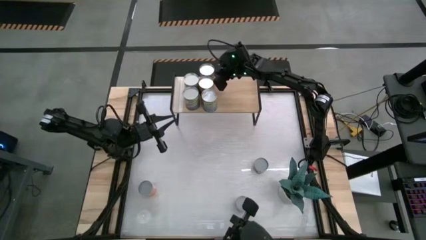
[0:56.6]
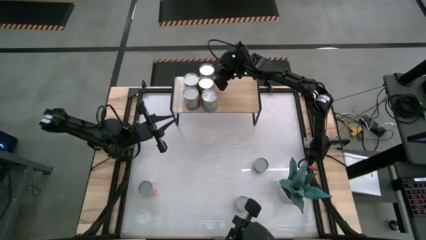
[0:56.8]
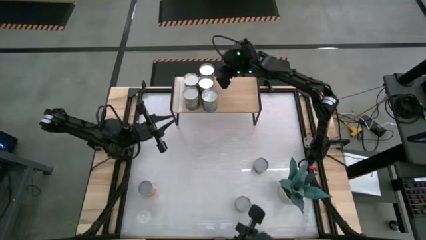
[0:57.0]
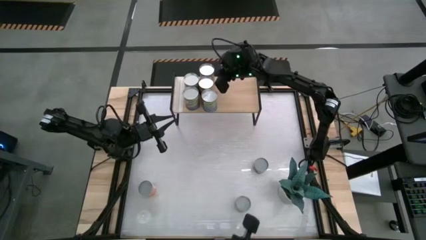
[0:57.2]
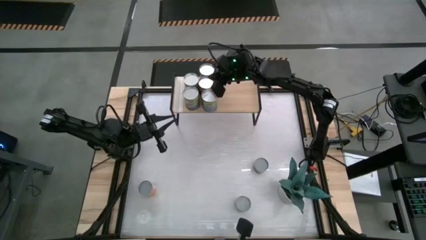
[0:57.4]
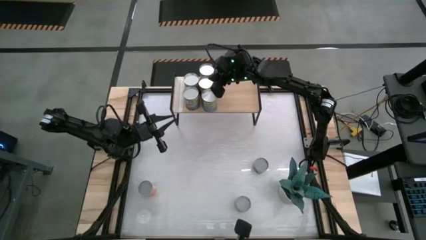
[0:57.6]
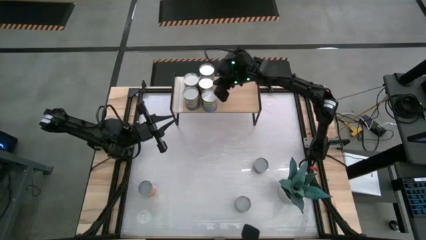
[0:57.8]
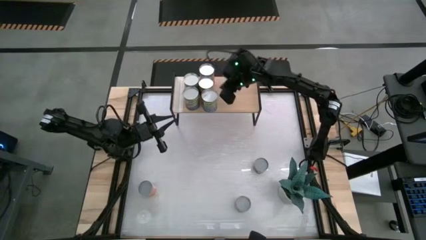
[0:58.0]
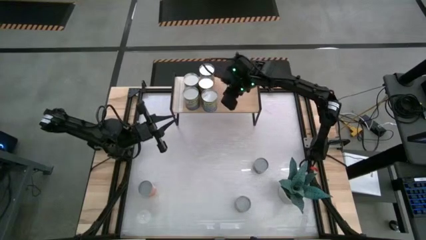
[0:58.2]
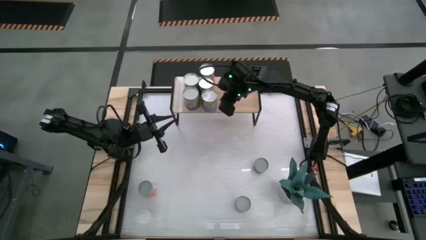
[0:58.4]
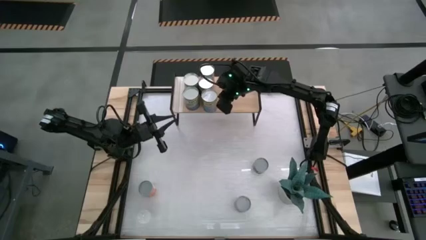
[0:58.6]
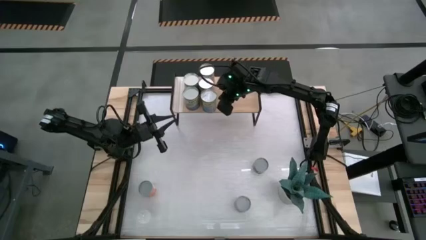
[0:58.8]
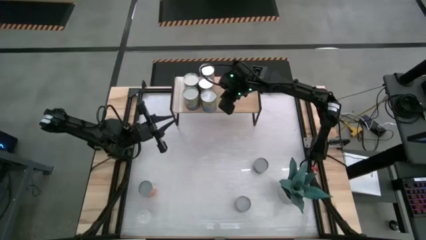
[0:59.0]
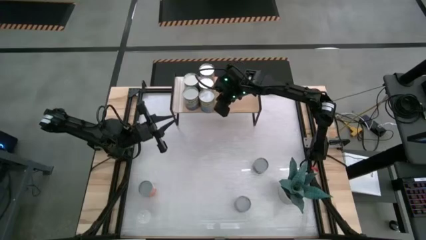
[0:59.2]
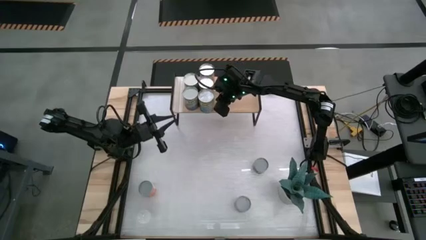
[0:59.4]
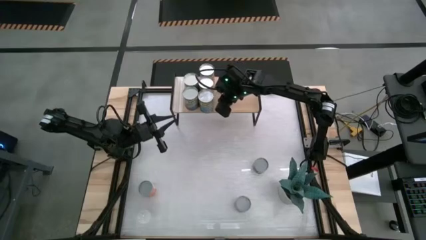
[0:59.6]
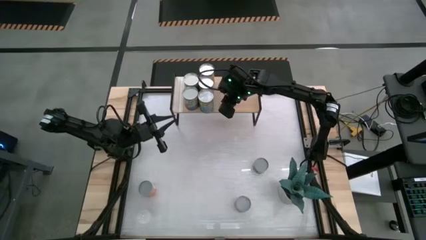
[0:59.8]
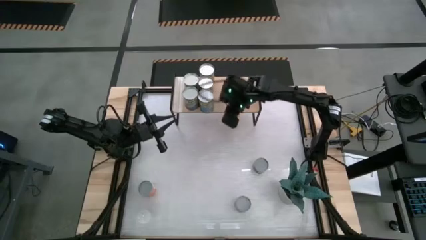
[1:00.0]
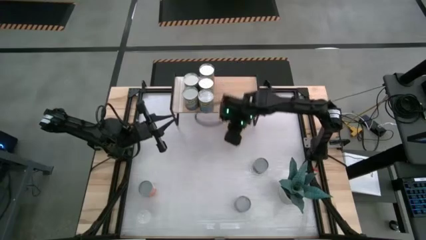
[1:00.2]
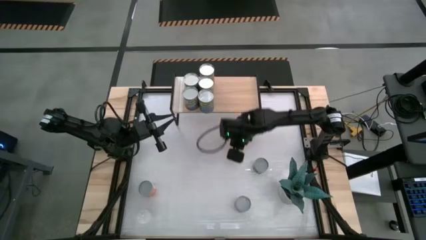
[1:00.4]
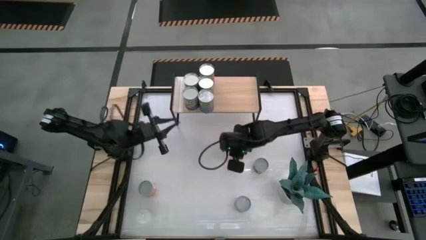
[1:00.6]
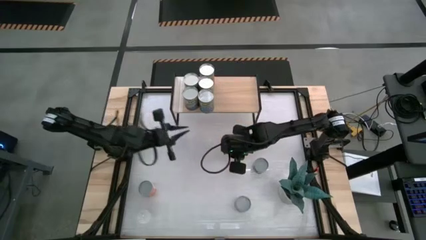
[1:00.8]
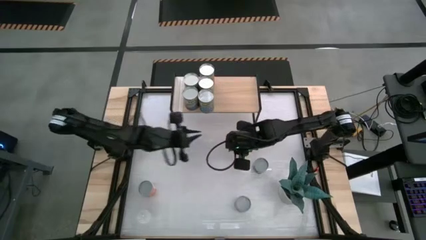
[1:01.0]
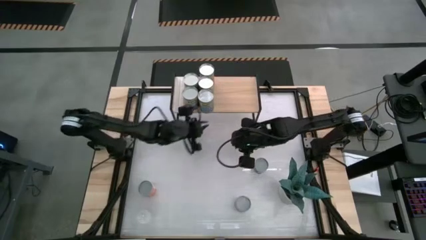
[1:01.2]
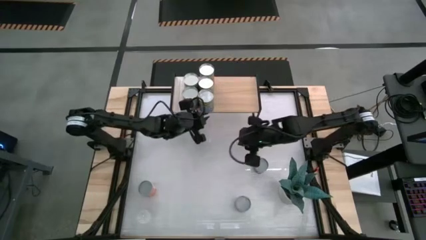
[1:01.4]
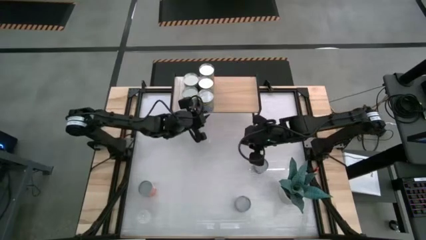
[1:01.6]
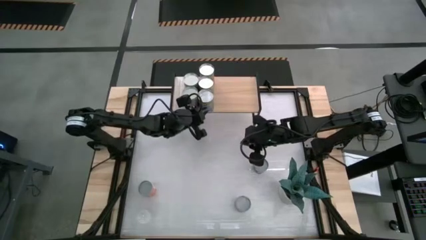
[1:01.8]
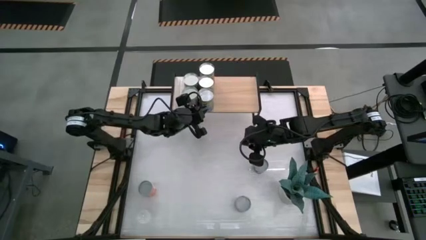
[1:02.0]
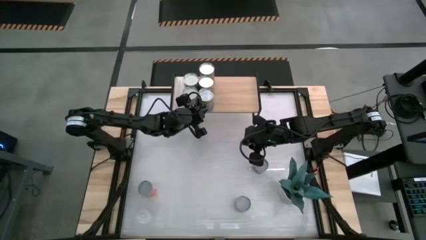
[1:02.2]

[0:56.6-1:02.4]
Task: Pick and place cans onto a shelf
Adjust the canned cherries on the shelf

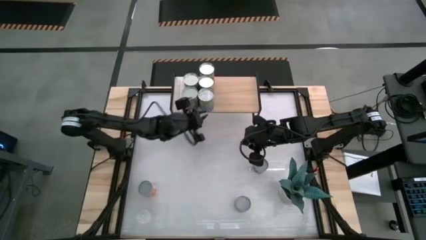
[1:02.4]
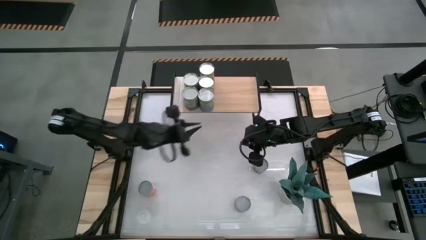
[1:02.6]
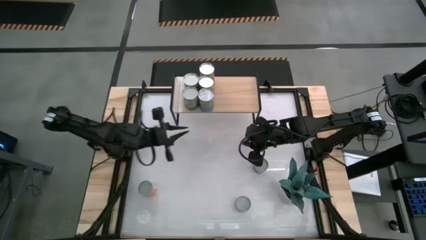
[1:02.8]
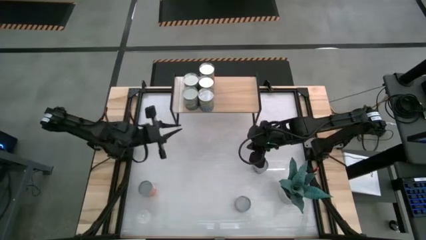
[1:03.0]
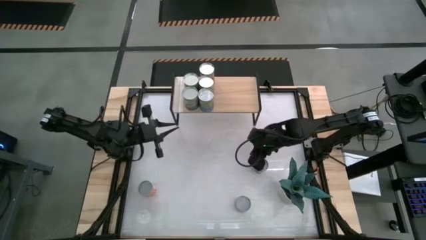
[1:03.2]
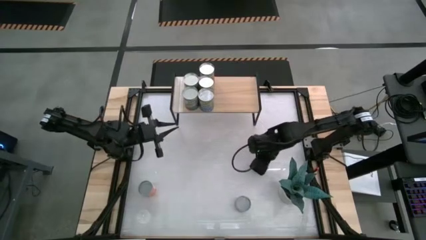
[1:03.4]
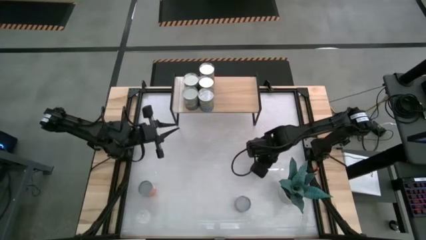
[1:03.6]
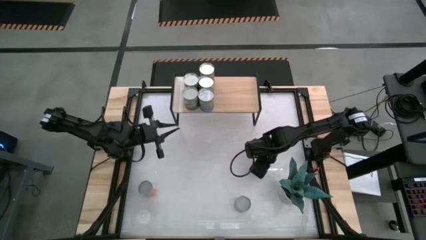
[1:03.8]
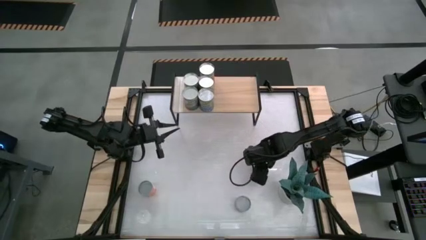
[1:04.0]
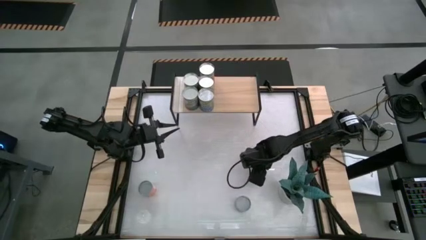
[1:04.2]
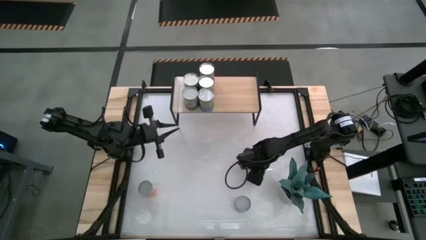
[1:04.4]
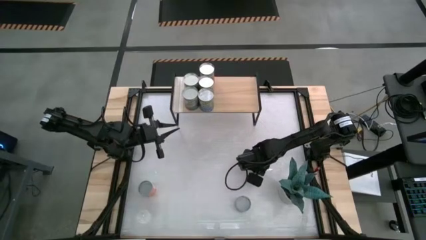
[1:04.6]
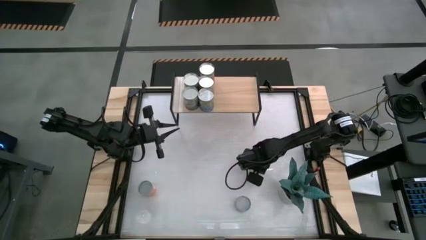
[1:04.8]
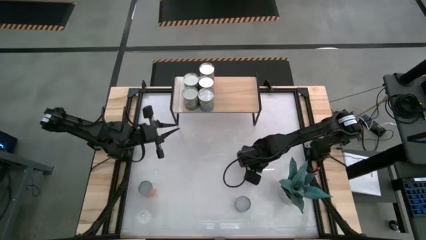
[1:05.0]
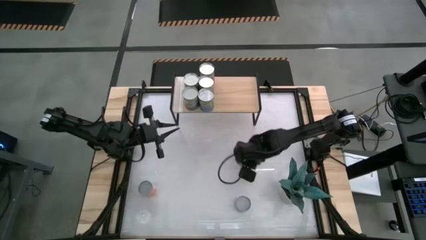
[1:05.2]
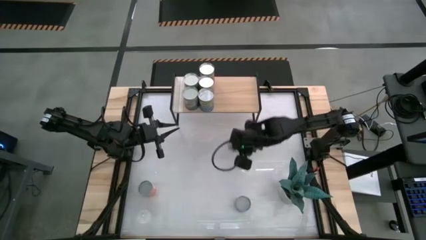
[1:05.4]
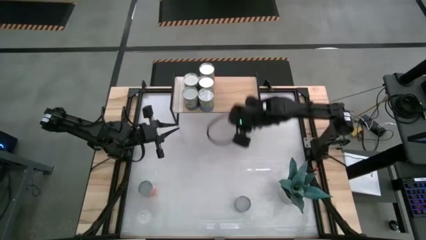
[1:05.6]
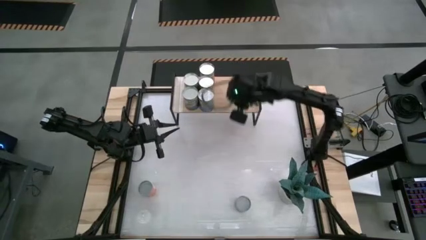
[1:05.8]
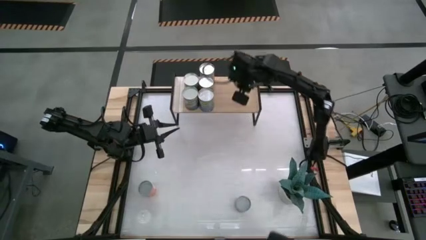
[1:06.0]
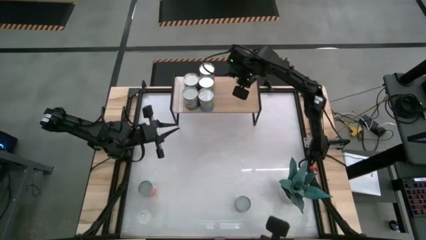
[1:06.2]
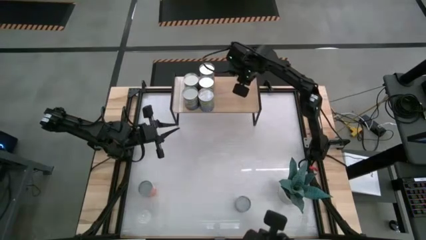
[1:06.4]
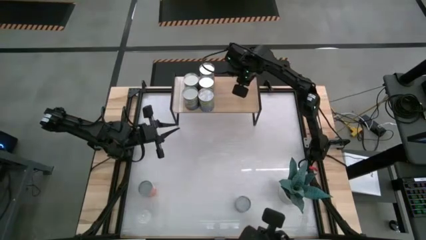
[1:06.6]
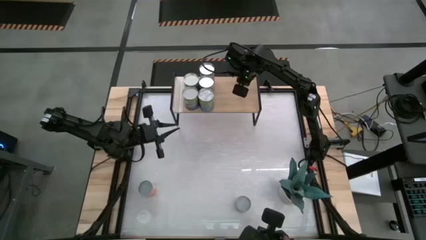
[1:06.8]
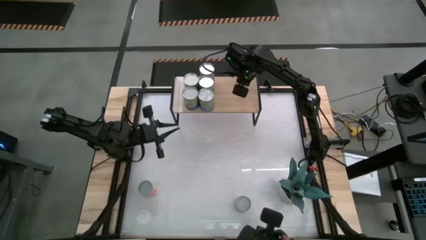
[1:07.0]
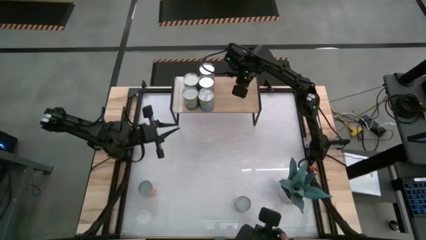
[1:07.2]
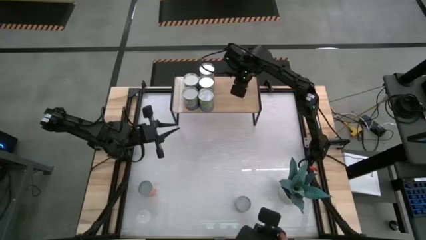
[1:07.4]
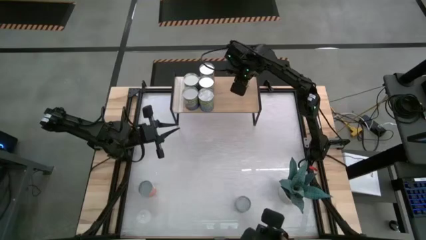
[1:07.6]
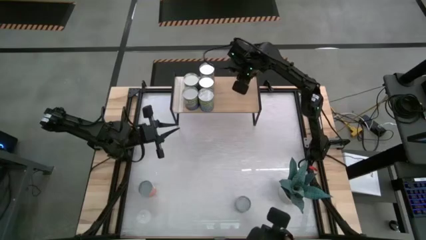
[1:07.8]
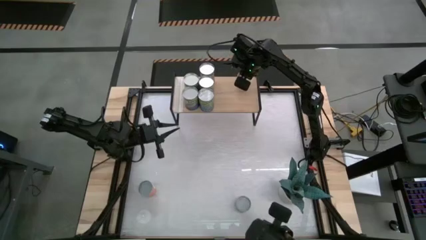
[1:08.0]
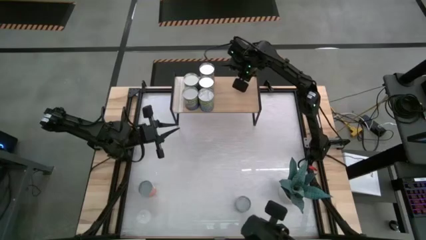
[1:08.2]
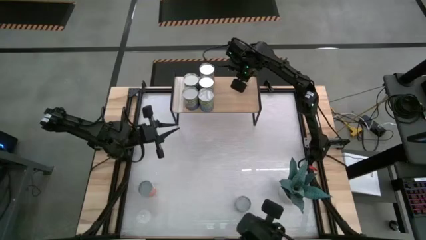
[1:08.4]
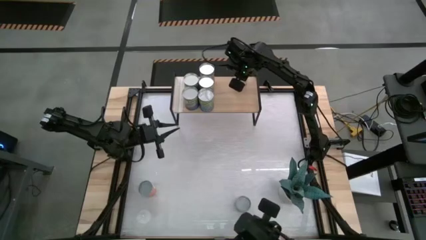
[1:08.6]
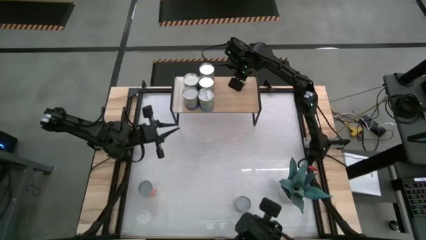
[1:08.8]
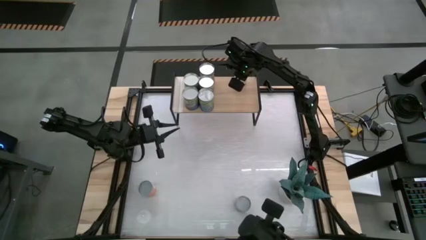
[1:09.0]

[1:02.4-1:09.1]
Put the small canned peas on the shelf

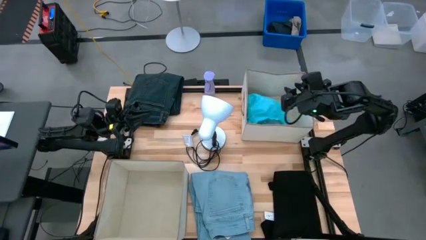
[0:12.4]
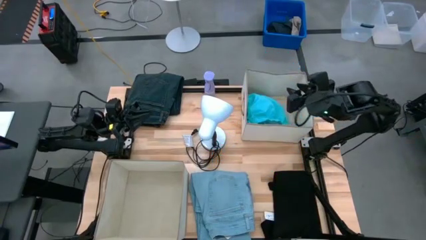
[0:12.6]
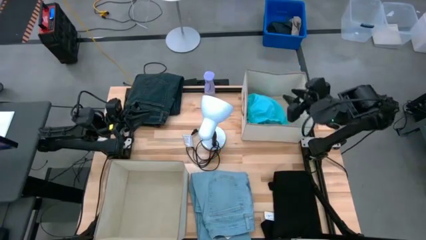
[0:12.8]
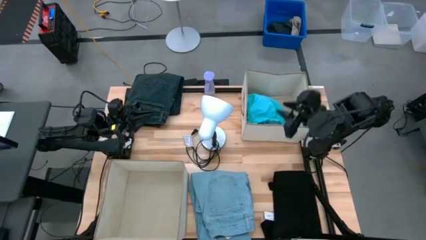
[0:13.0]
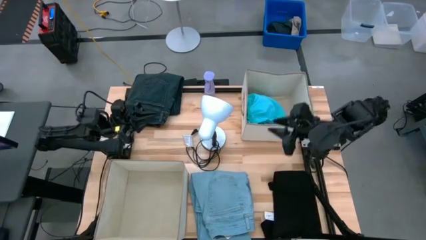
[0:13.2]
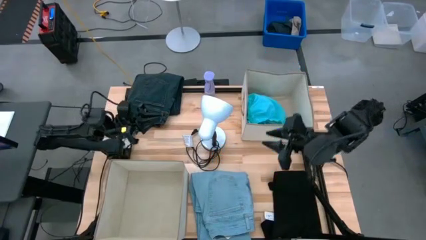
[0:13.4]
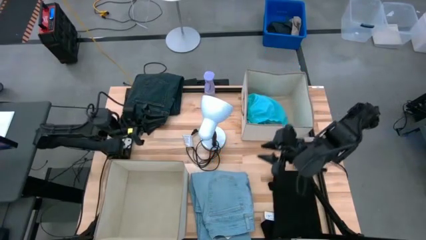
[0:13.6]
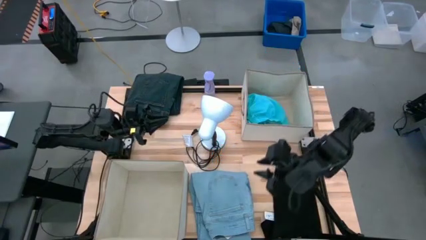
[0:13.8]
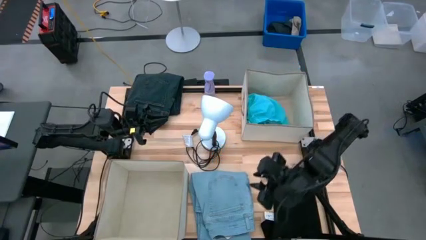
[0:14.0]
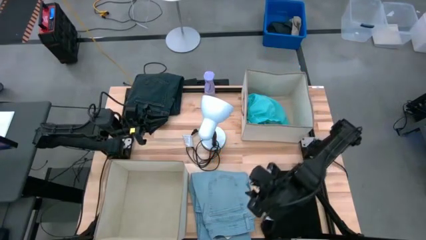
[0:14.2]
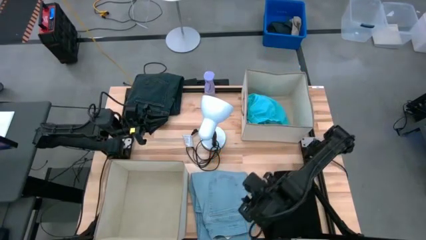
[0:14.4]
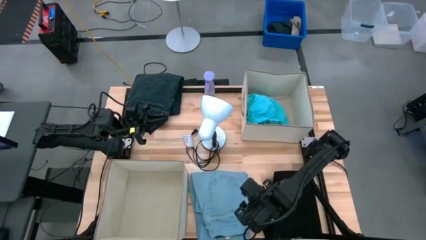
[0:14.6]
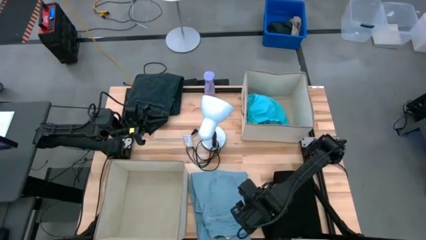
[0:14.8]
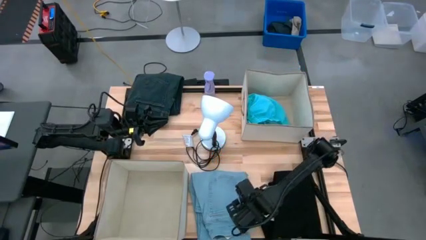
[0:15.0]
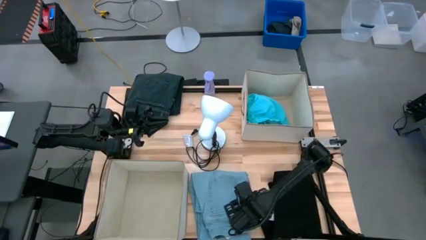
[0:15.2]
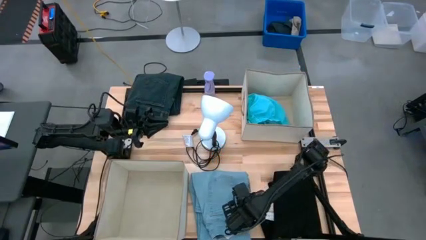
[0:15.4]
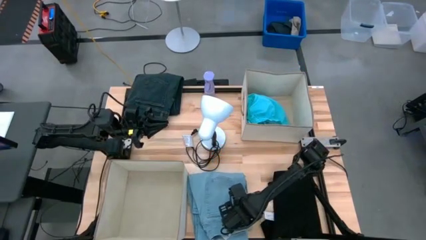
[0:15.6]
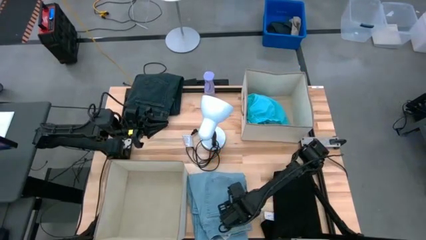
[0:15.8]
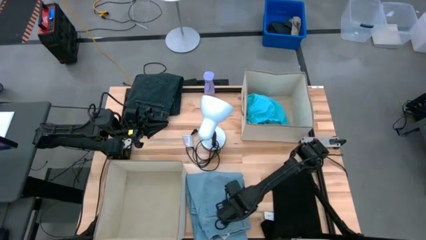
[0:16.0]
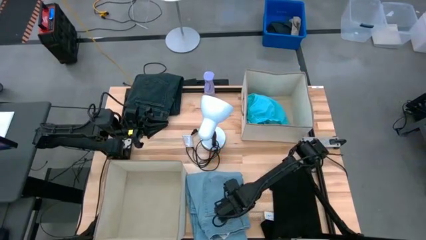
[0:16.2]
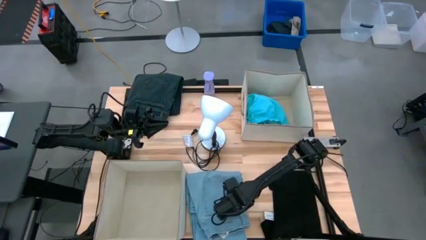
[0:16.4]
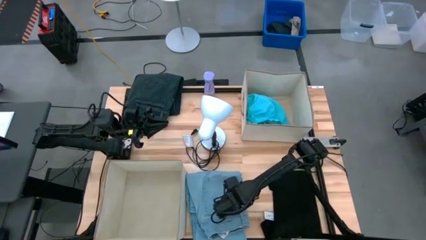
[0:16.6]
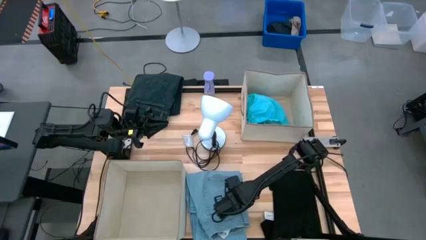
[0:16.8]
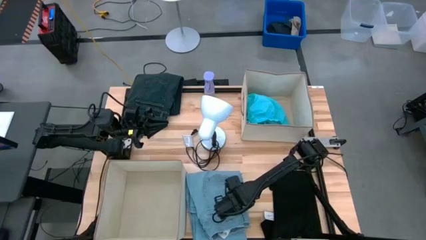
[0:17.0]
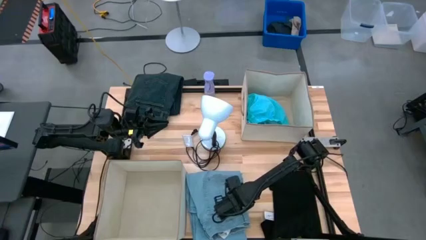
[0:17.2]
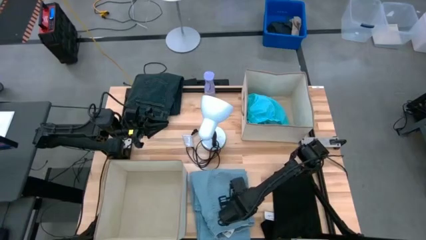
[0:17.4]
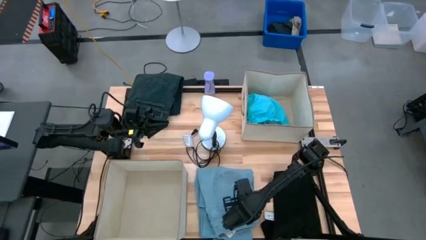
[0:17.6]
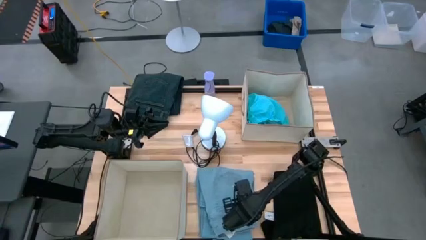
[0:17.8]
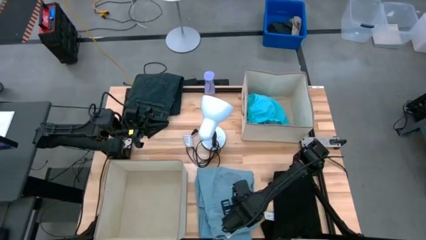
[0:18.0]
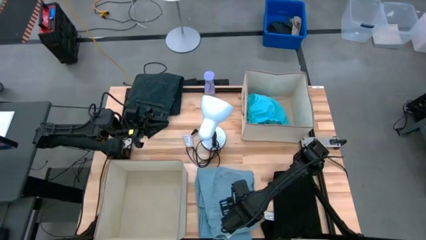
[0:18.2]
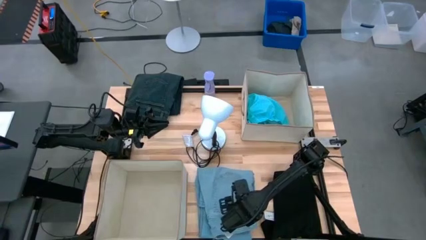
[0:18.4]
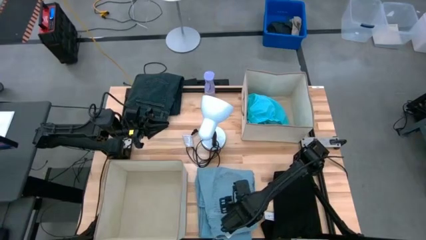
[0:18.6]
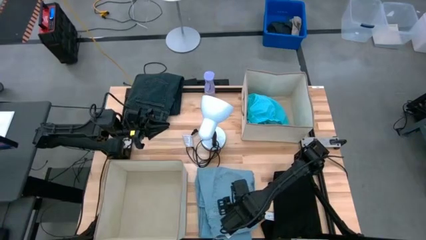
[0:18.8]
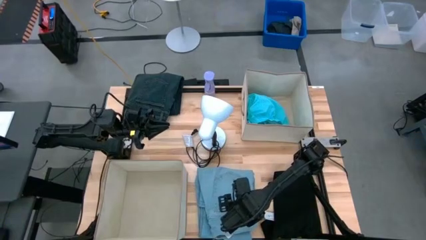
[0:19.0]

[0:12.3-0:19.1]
Task: Sort clothes
Put the light blue pants into the top laundry organizer
